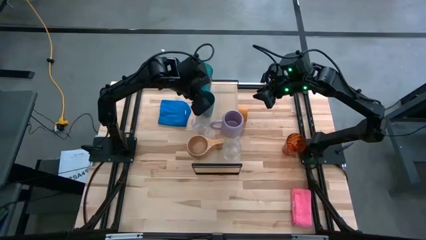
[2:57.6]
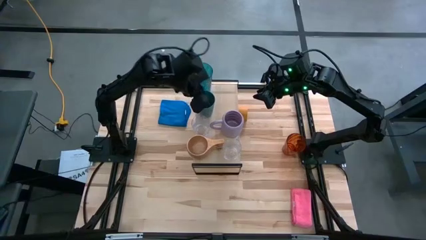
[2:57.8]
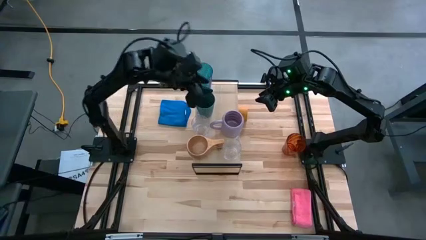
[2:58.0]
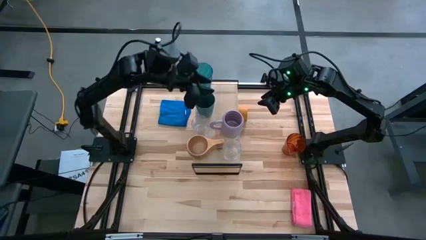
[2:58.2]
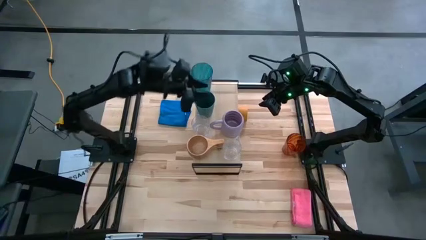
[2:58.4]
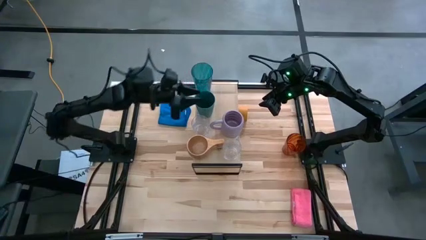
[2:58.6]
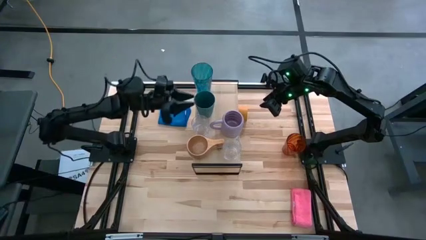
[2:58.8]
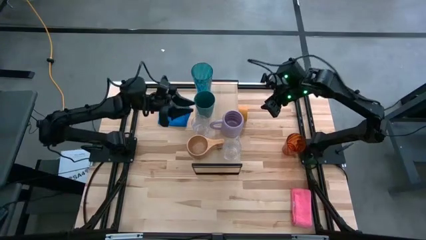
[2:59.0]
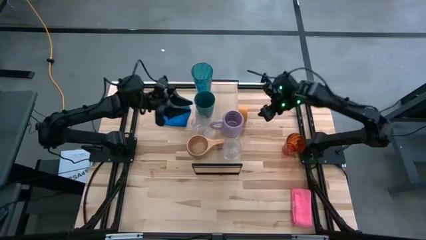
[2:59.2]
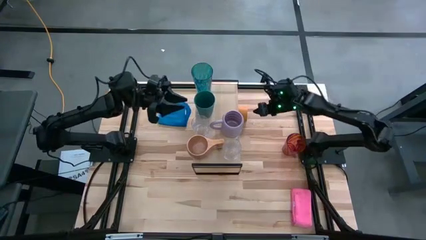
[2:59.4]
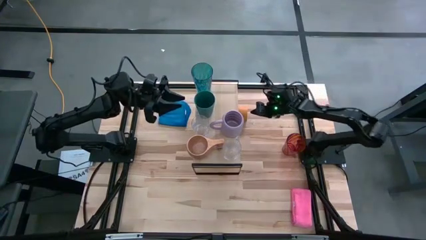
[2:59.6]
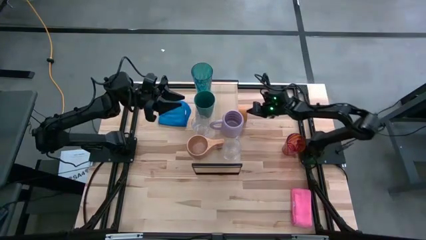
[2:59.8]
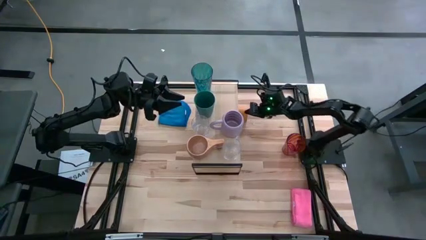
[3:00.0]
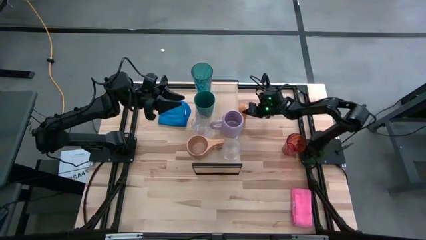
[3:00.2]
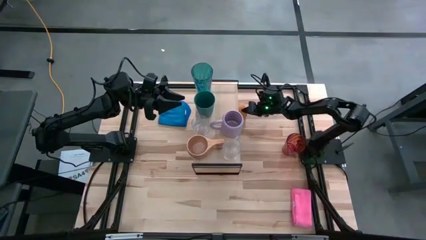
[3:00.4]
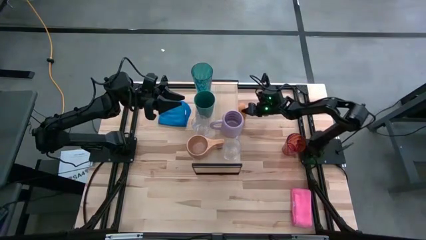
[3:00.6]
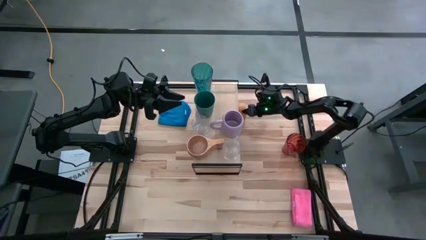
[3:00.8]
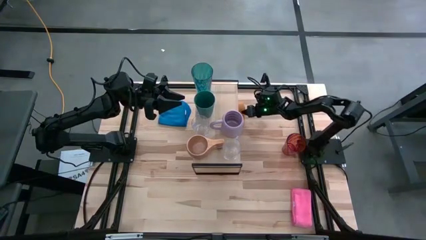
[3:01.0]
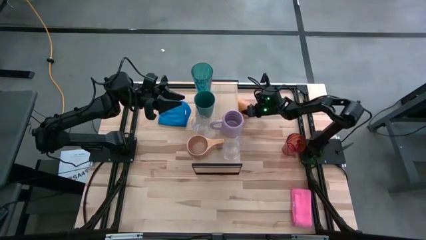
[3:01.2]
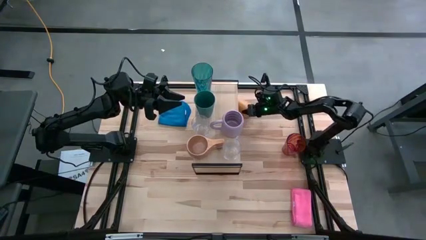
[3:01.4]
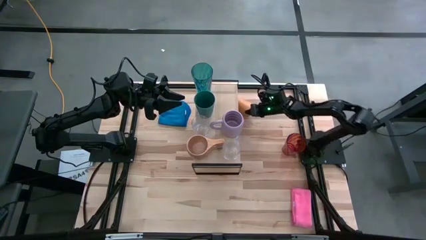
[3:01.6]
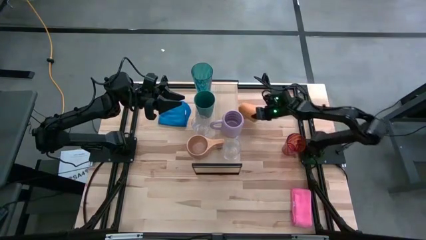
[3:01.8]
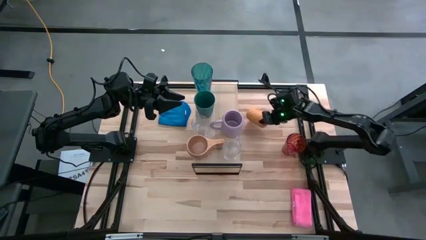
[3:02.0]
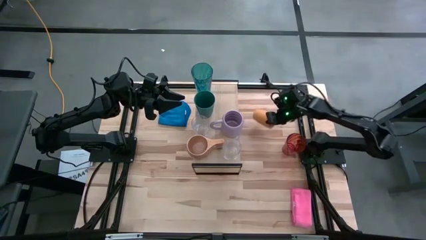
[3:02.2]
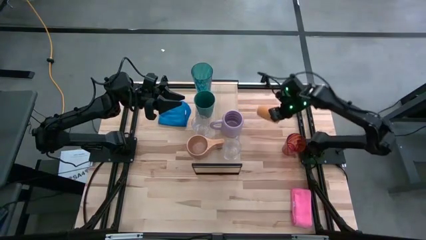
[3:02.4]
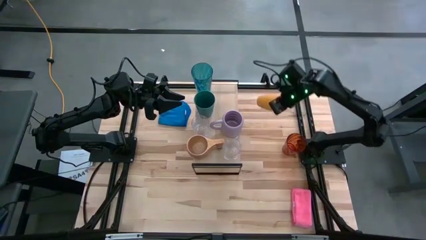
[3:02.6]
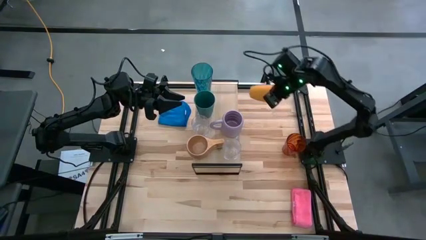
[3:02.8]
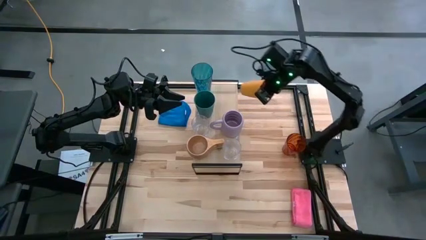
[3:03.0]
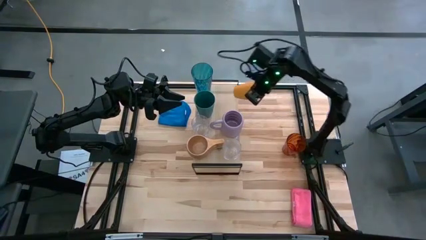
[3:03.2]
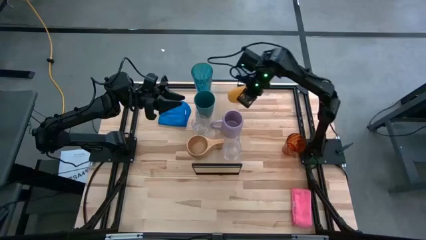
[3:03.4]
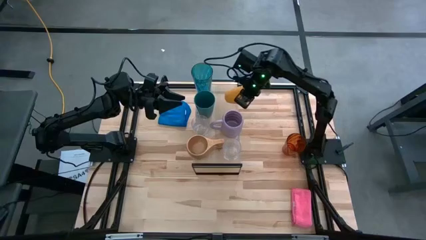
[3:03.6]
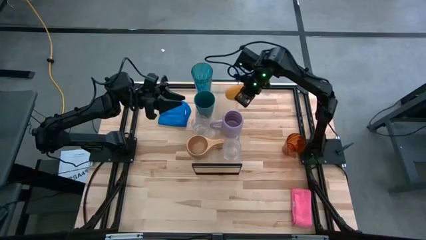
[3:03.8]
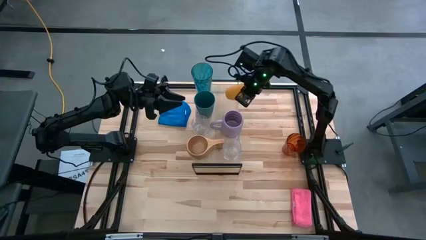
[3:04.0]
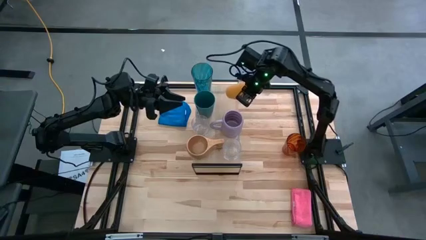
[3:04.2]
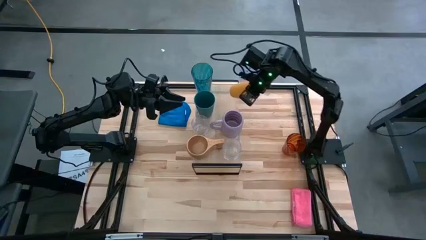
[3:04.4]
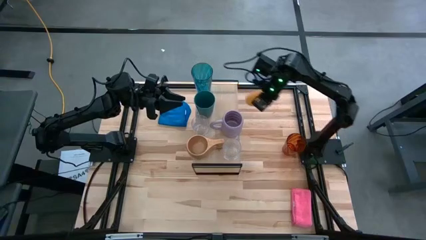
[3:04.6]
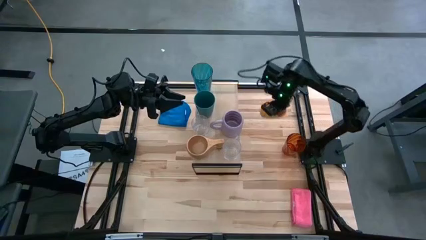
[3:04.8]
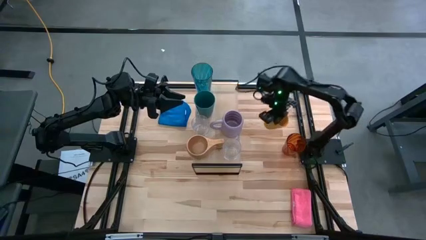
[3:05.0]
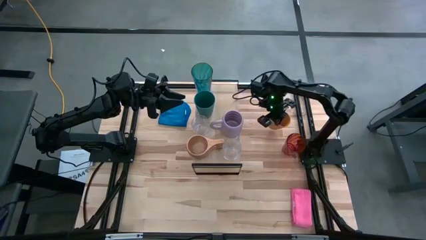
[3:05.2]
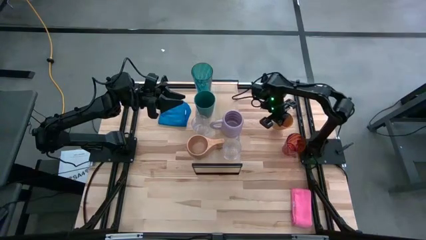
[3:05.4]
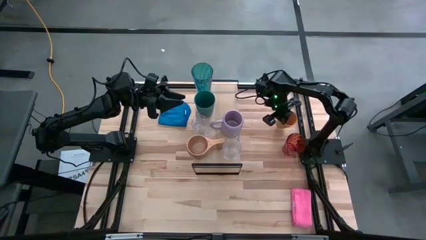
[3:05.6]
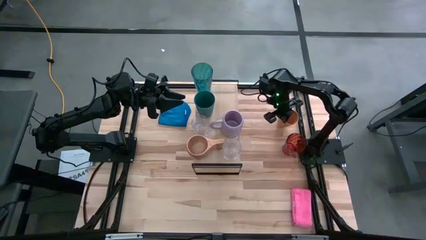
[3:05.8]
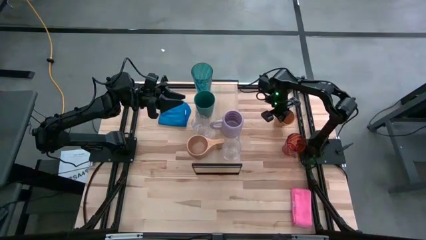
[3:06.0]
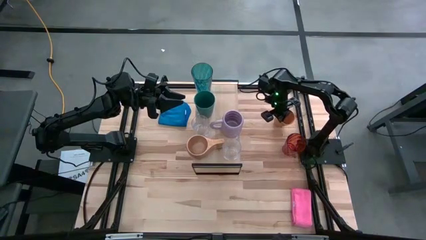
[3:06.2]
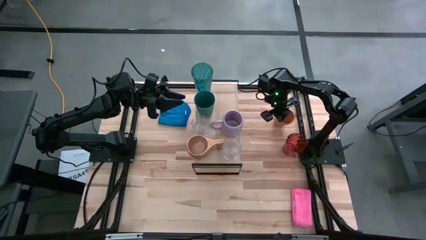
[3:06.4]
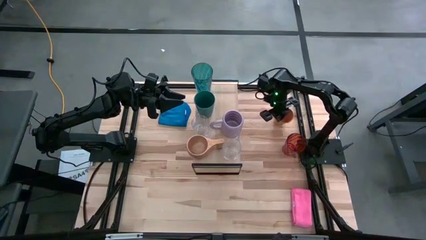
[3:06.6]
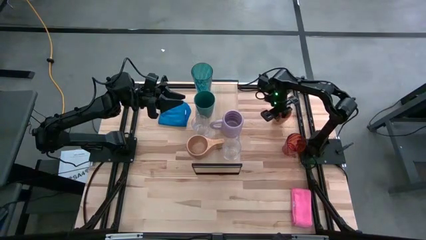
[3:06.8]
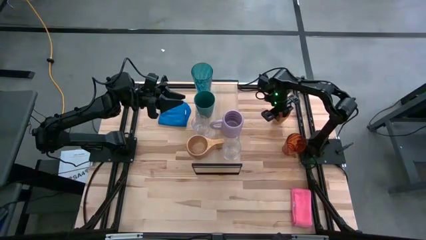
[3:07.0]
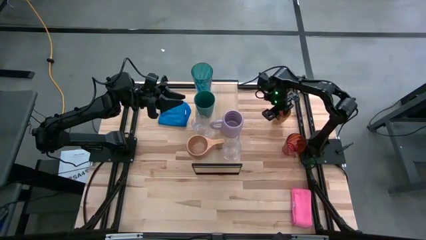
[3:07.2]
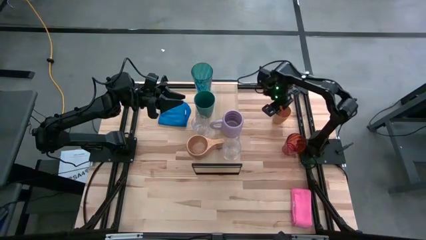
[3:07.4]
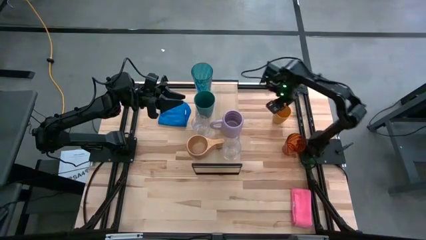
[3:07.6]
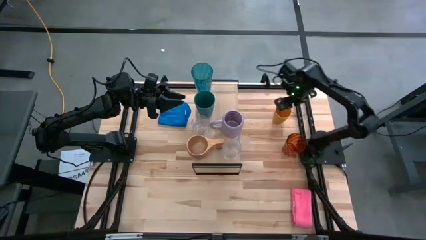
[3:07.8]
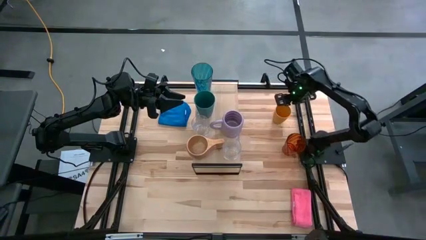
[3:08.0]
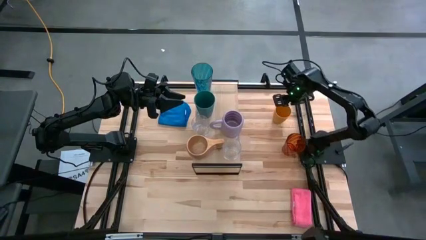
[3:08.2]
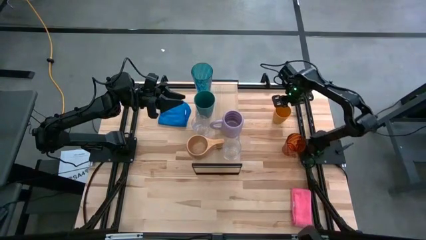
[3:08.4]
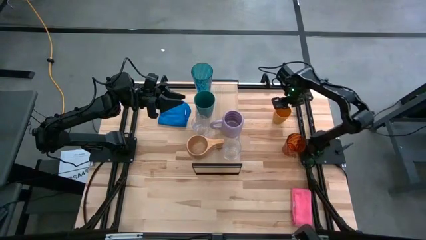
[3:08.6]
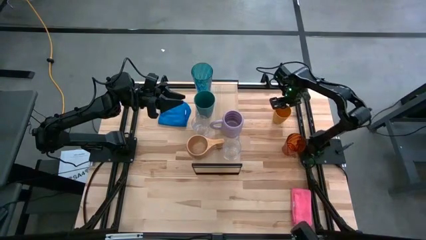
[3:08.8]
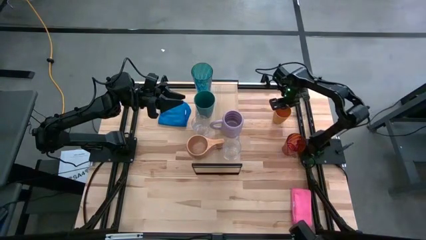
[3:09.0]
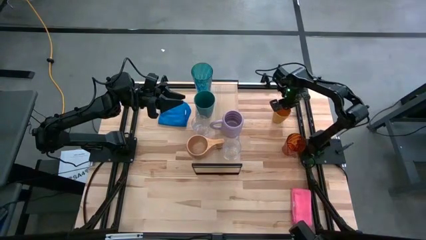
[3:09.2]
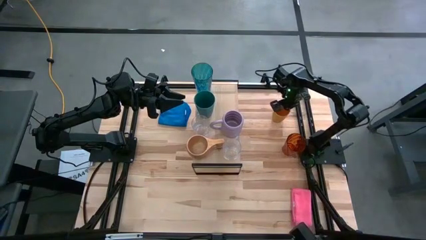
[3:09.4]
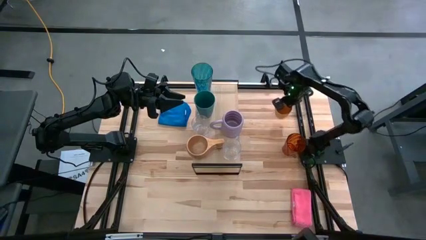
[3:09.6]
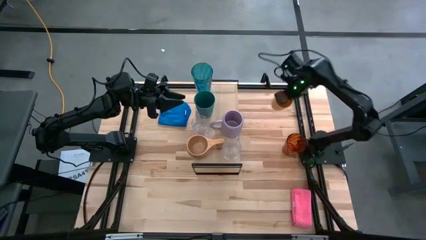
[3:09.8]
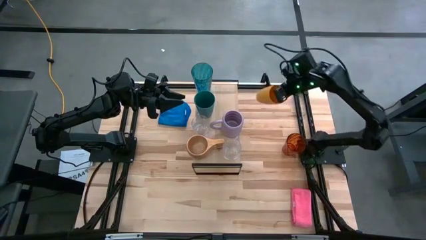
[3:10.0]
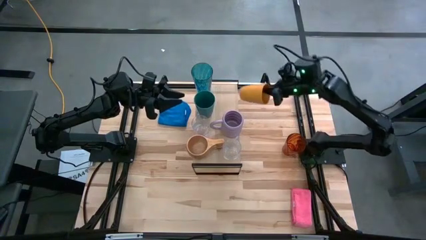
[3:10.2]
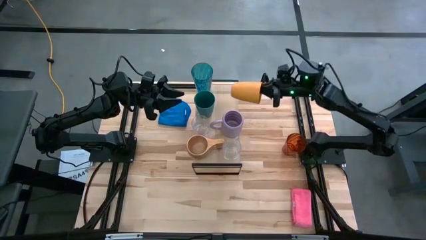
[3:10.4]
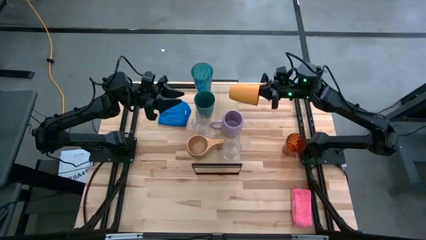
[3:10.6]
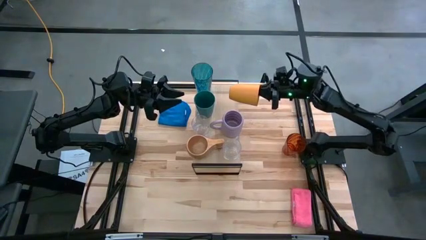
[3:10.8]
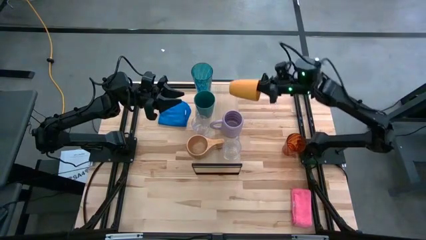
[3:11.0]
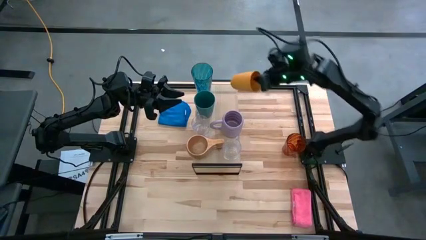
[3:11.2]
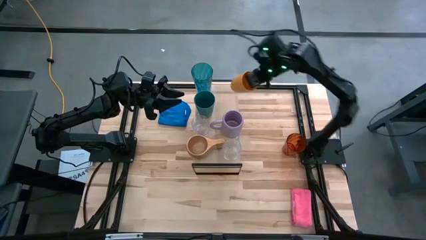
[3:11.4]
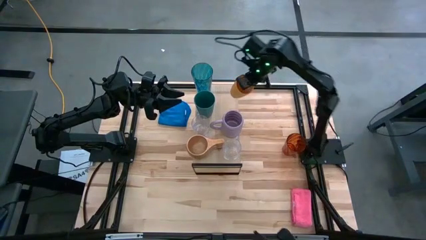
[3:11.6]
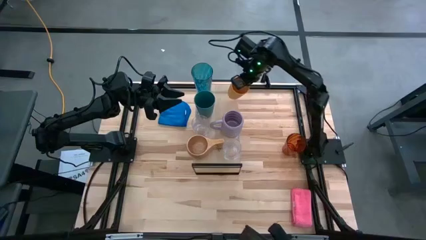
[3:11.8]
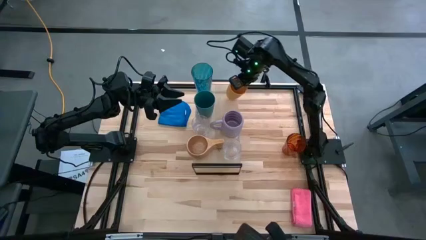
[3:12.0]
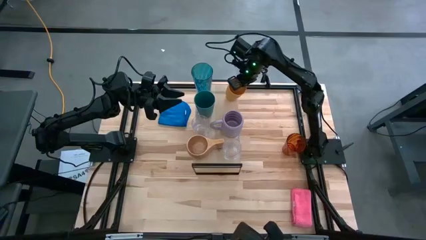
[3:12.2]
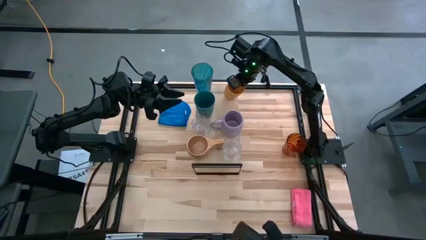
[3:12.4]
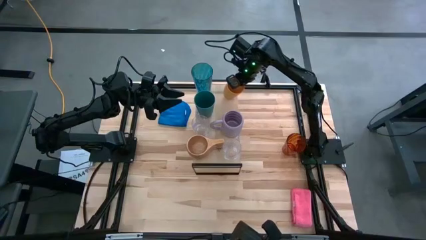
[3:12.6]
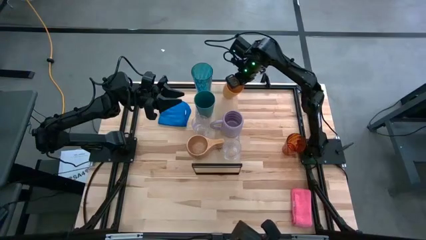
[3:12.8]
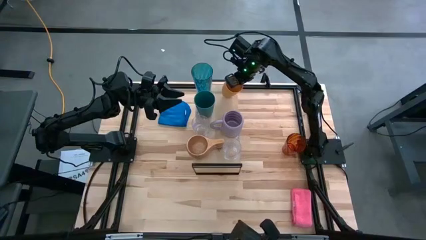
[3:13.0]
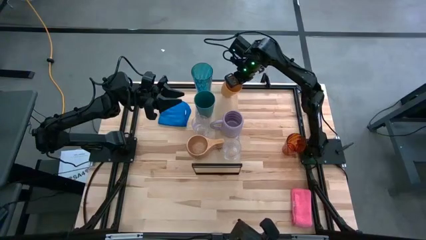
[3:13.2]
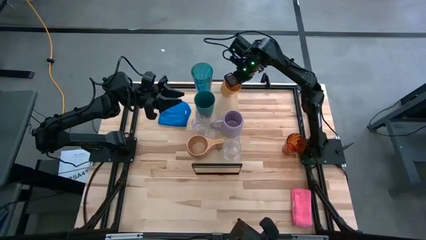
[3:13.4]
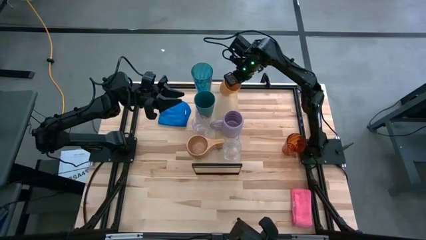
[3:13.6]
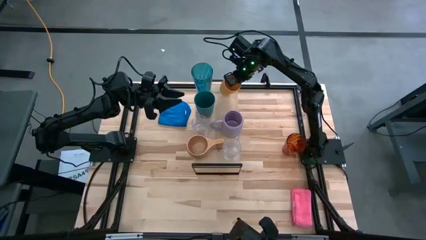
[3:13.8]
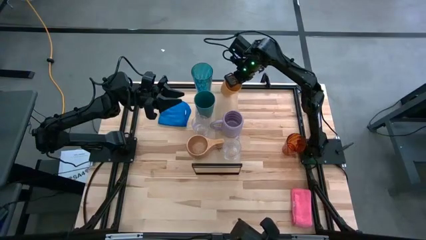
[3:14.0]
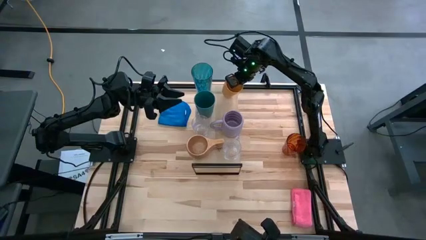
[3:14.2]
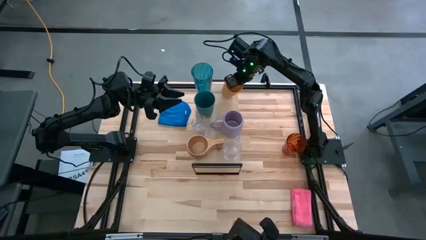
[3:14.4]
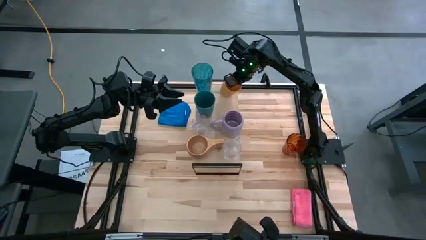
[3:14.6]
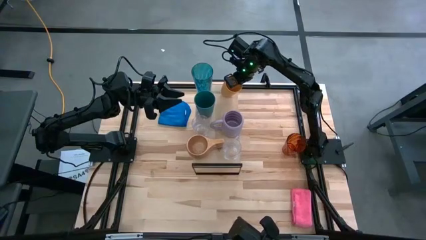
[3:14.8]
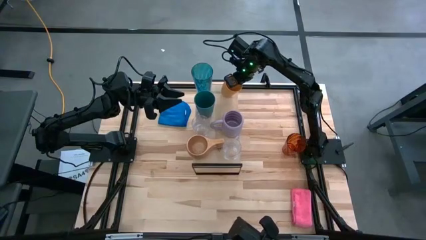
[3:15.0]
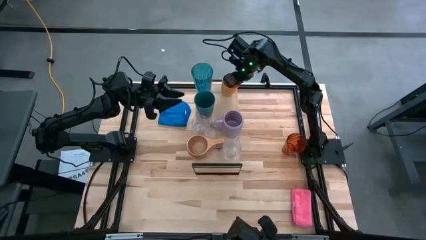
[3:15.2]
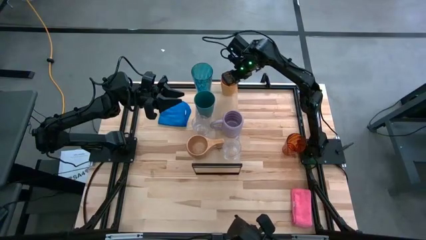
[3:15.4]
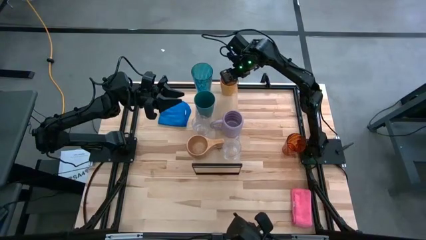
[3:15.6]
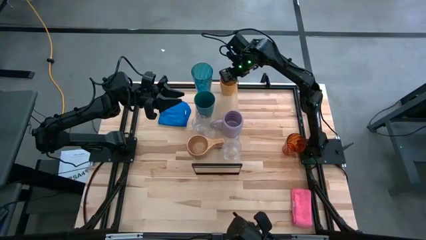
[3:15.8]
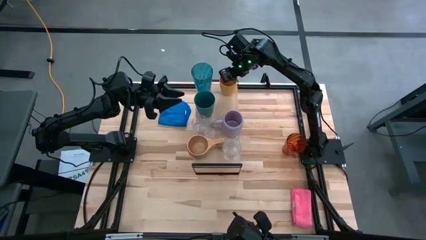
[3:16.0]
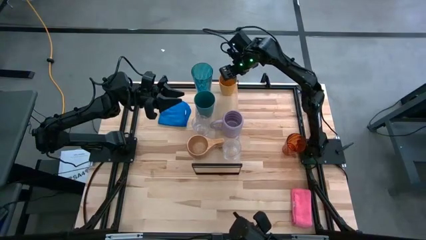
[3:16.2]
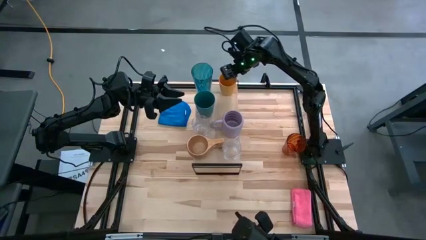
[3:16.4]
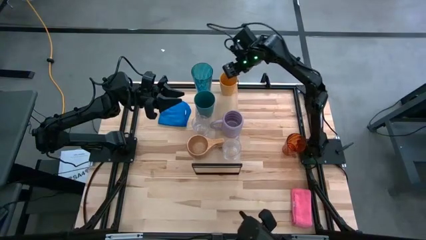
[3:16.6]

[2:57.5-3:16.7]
Task: Stack small to large cups/mugs on shelf
Put the yellow cup on the shelf
